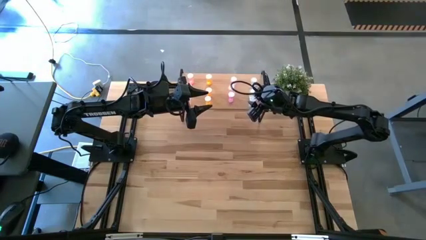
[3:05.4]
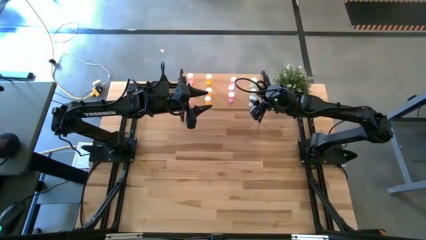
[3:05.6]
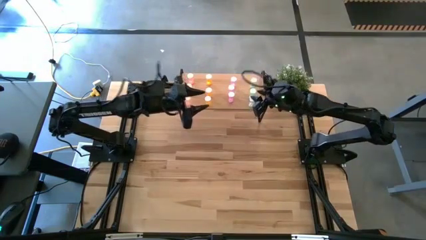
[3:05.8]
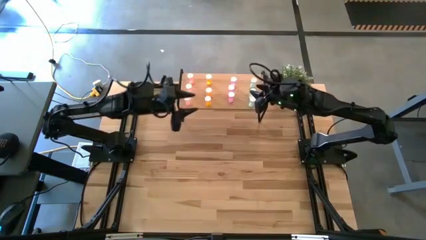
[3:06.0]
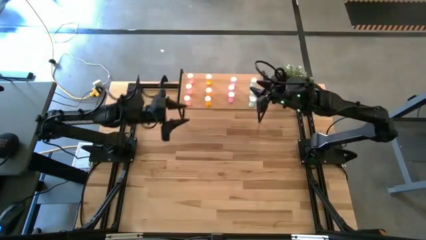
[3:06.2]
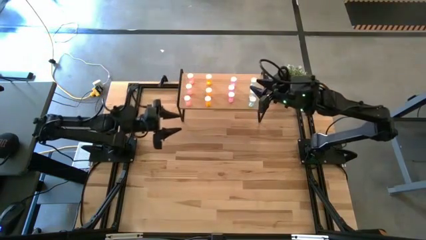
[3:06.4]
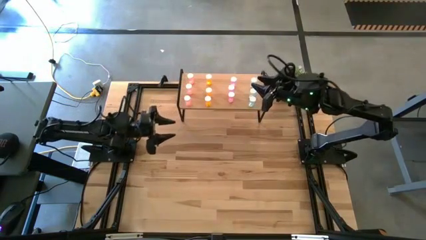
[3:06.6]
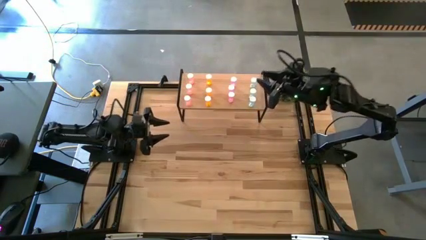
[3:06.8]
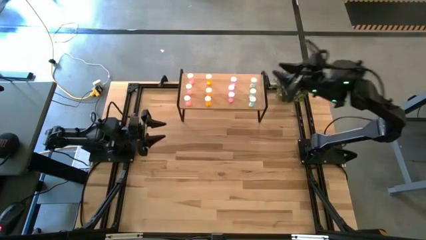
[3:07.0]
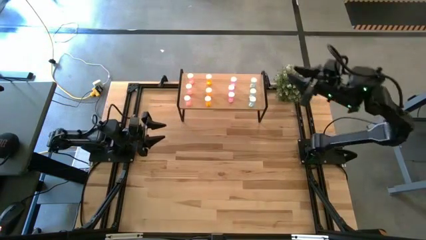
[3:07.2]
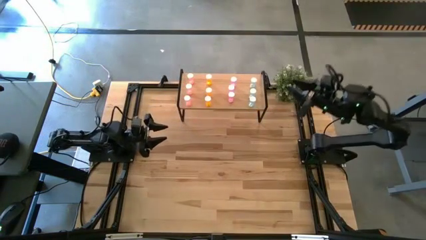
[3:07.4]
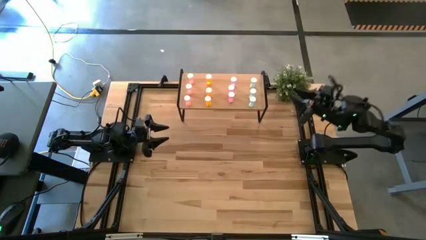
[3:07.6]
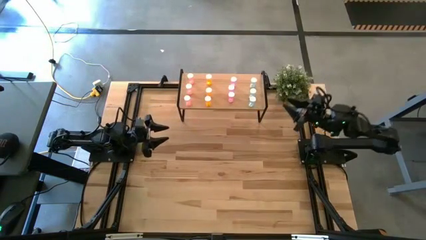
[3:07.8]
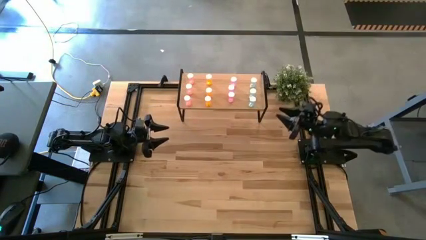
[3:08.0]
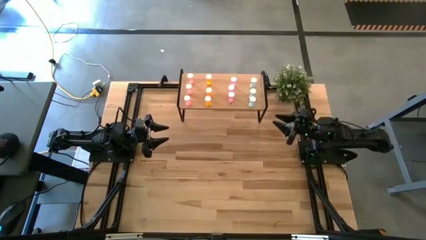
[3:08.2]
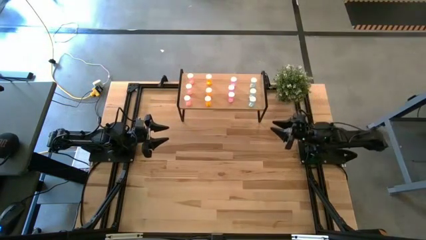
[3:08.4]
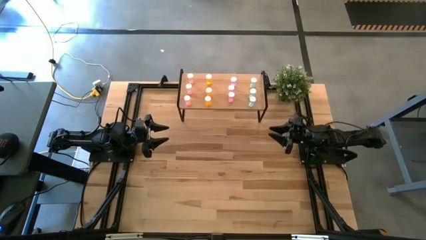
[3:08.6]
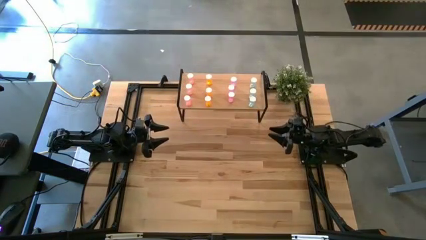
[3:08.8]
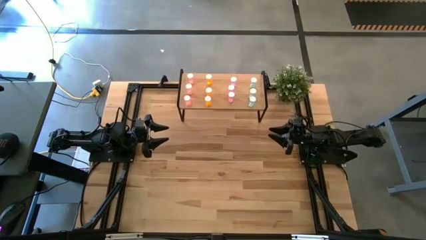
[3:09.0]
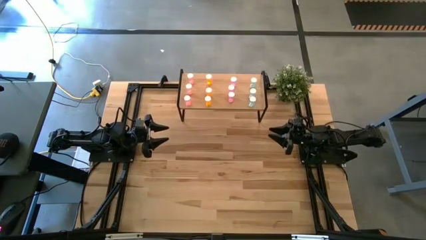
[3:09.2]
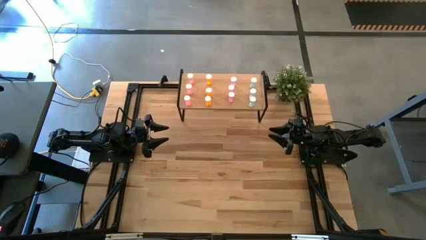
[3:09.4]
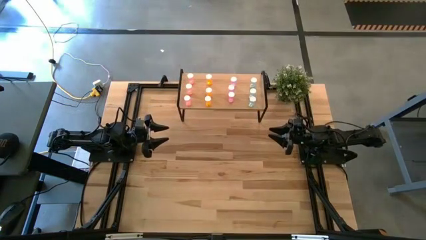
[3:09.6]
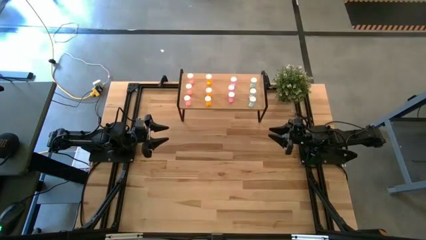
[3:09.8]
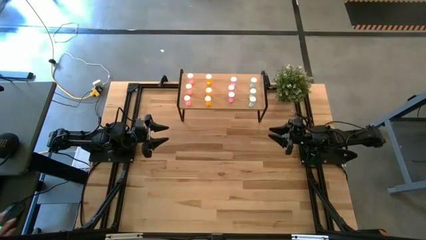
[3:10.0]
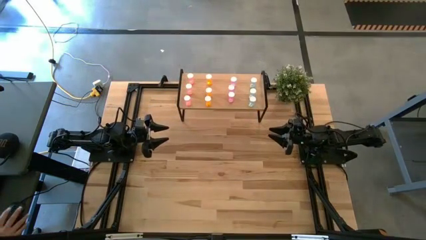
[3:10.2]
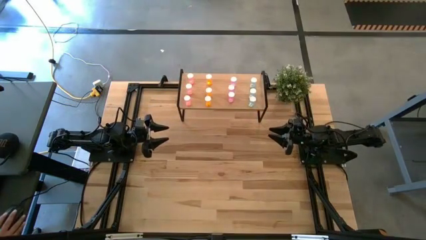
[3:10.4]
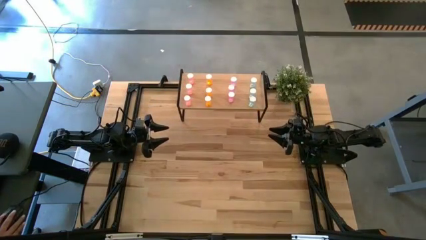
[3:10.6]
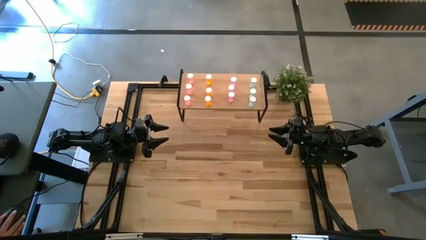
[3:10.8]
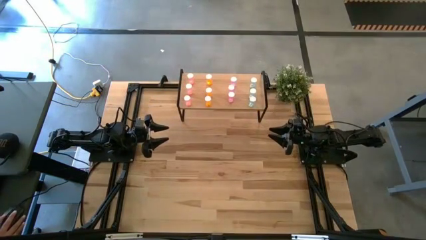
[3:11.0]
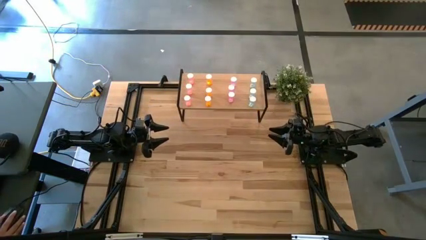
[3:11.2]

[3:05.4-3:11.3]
Task: Pick and place medicine bottles onto shelf by color
Return to Home Position

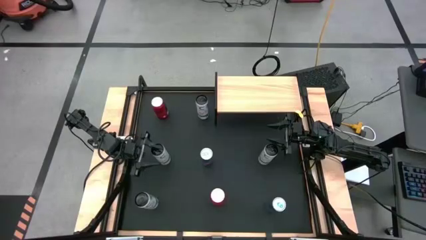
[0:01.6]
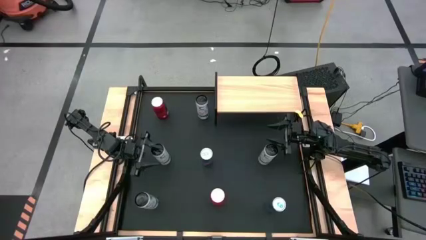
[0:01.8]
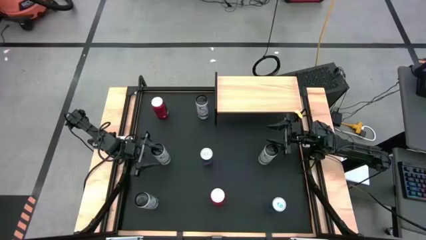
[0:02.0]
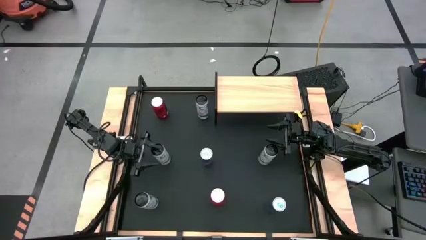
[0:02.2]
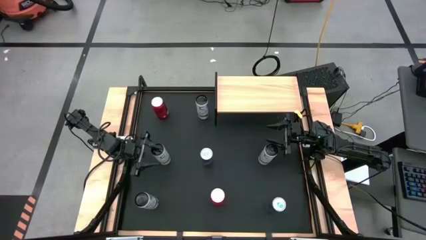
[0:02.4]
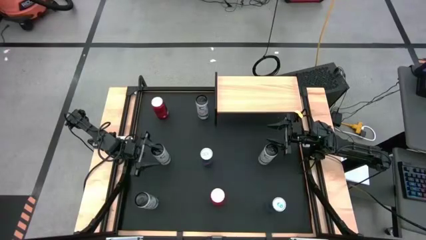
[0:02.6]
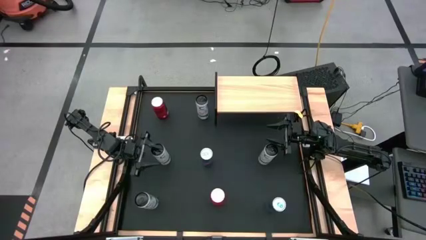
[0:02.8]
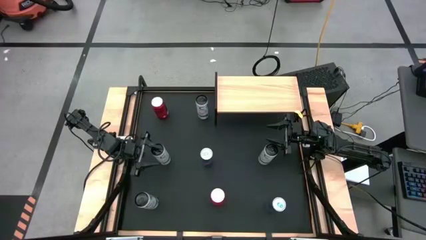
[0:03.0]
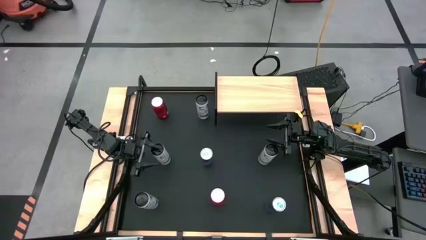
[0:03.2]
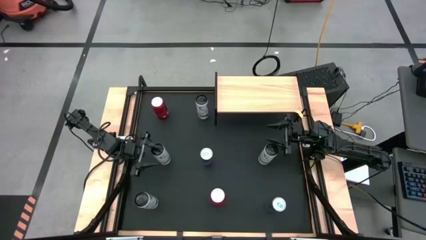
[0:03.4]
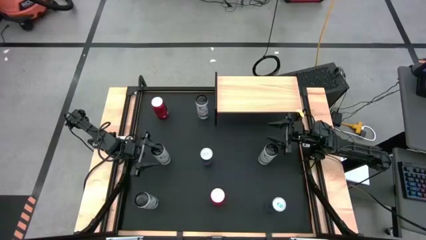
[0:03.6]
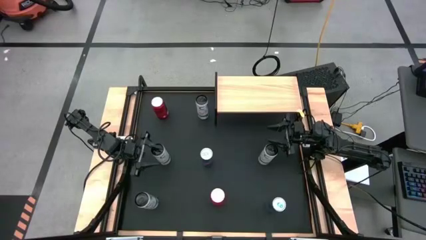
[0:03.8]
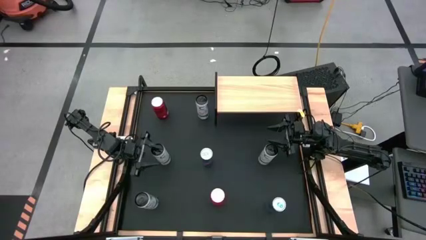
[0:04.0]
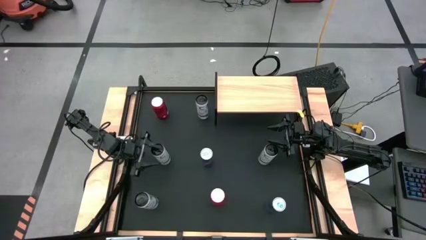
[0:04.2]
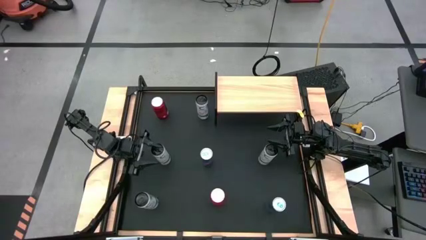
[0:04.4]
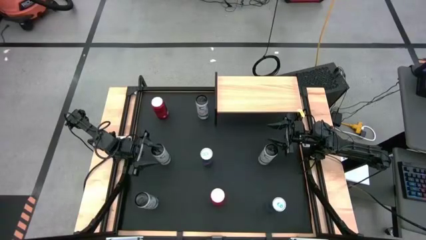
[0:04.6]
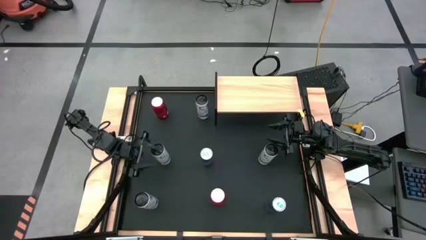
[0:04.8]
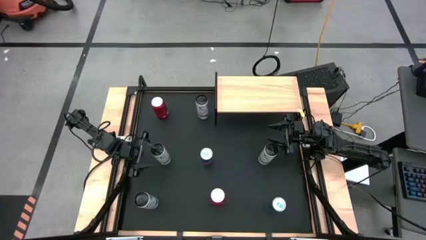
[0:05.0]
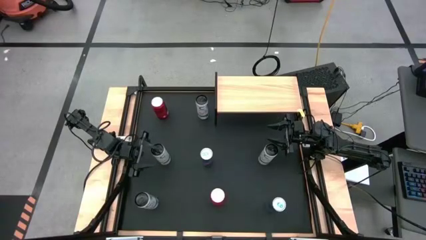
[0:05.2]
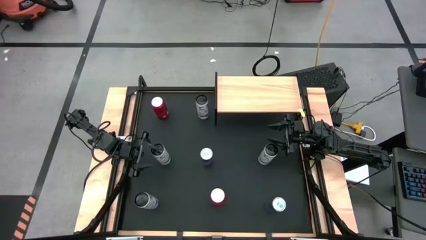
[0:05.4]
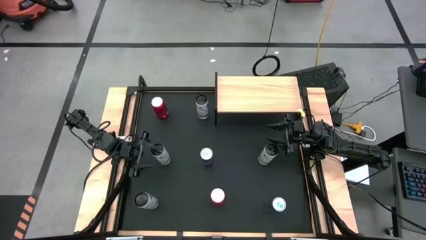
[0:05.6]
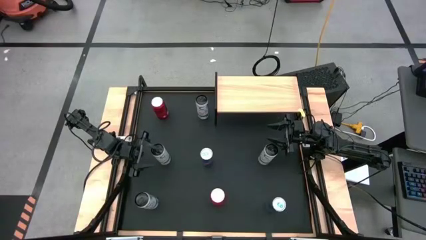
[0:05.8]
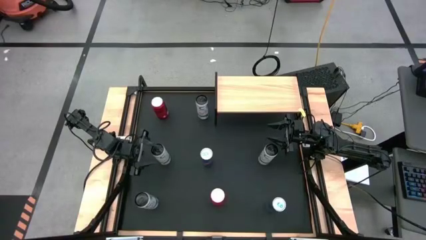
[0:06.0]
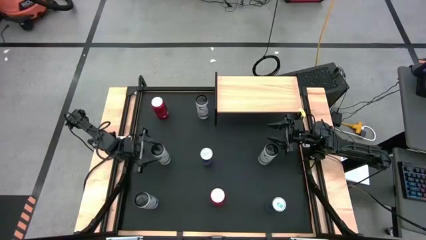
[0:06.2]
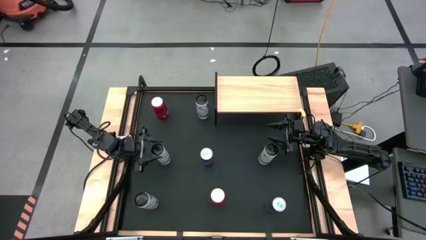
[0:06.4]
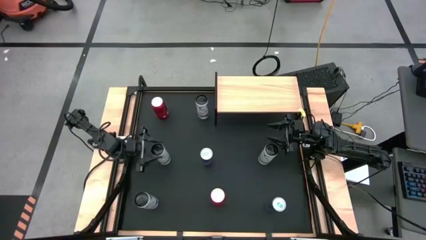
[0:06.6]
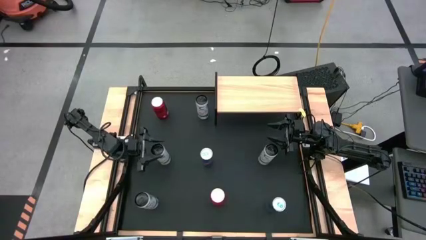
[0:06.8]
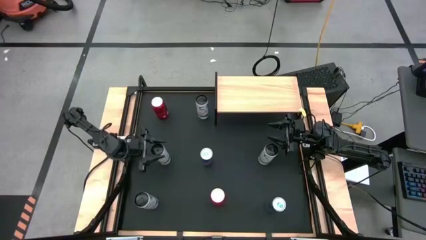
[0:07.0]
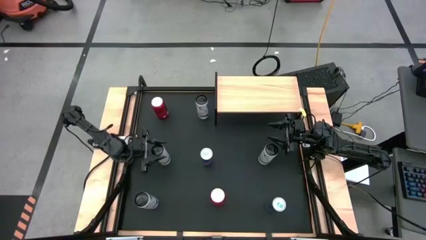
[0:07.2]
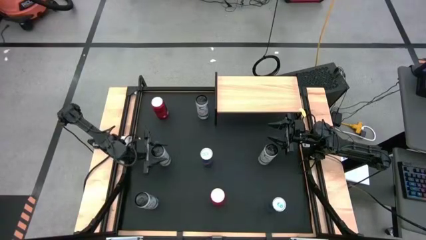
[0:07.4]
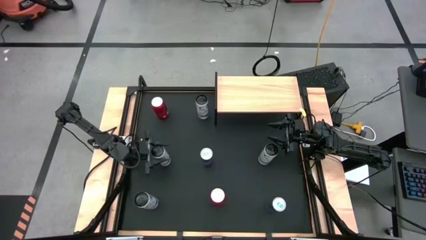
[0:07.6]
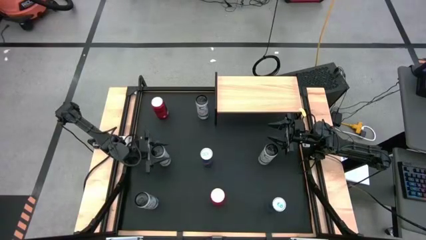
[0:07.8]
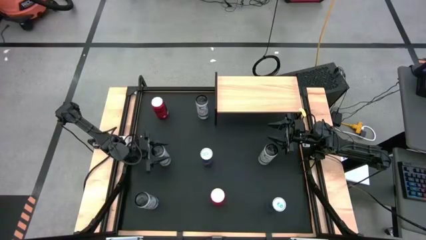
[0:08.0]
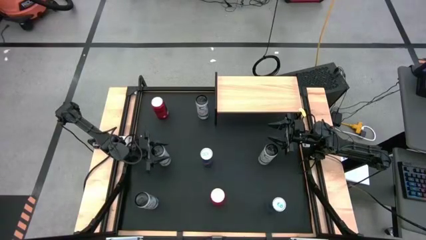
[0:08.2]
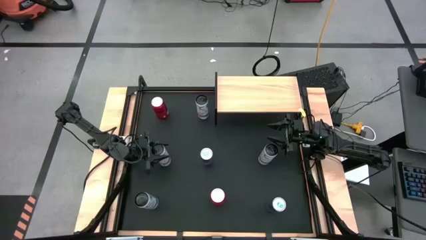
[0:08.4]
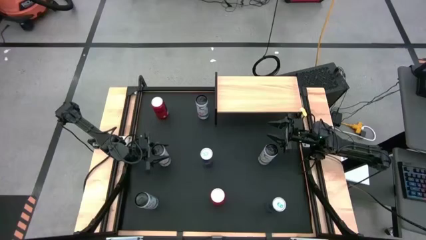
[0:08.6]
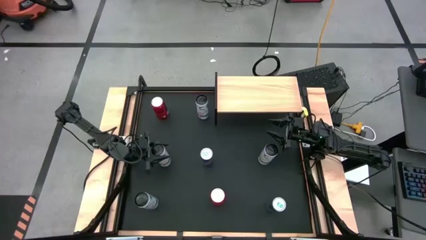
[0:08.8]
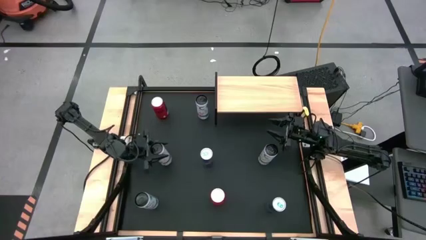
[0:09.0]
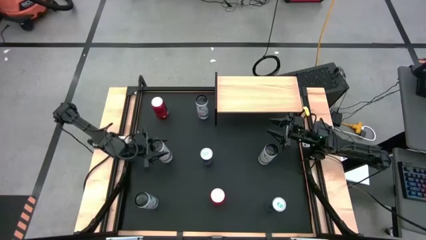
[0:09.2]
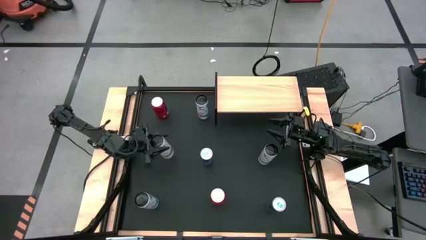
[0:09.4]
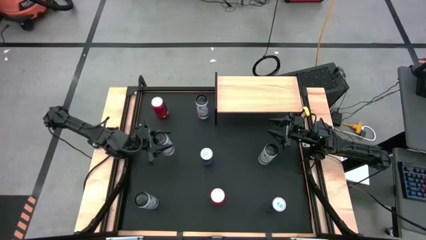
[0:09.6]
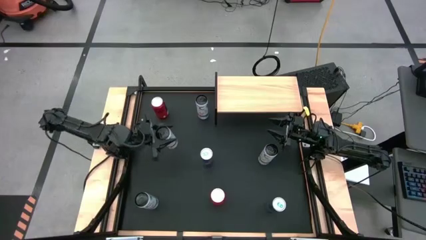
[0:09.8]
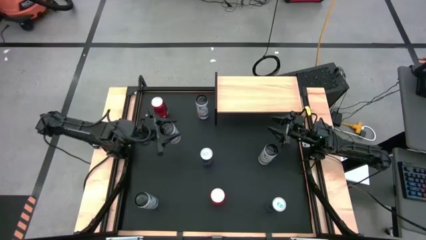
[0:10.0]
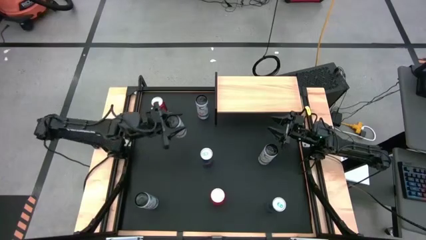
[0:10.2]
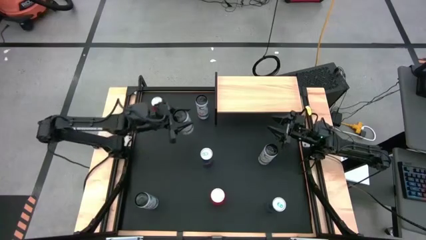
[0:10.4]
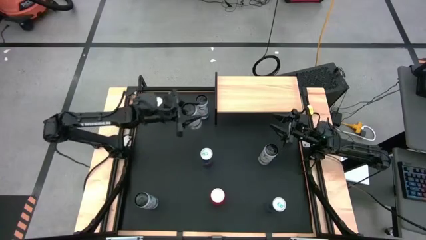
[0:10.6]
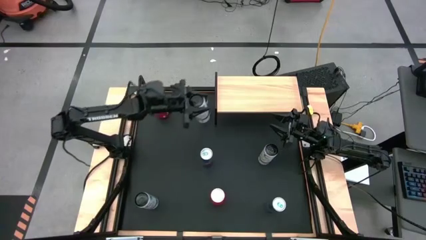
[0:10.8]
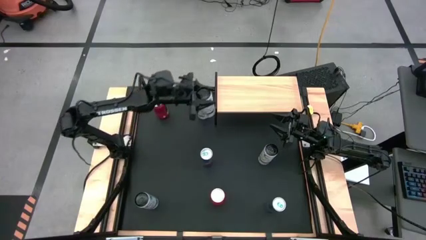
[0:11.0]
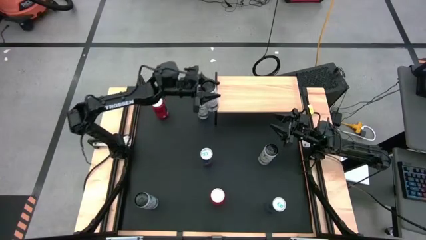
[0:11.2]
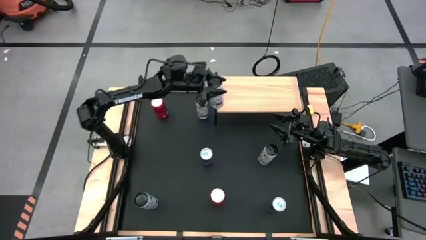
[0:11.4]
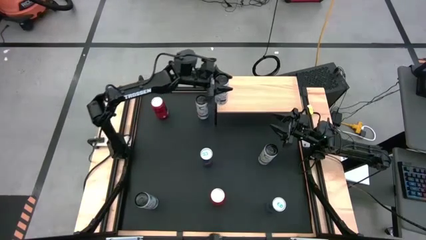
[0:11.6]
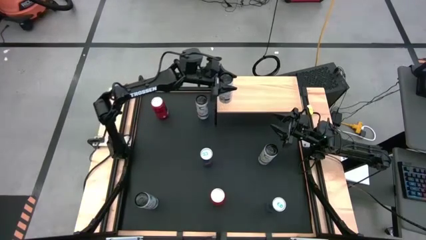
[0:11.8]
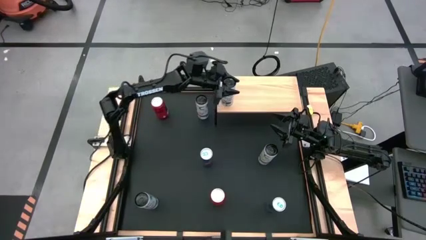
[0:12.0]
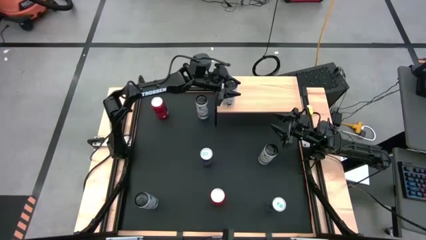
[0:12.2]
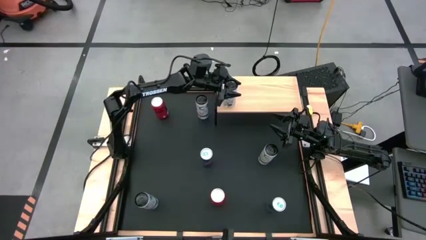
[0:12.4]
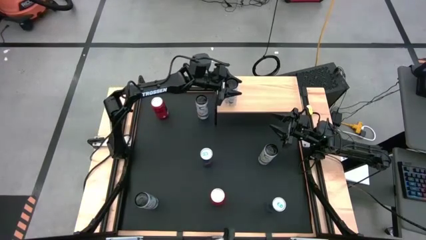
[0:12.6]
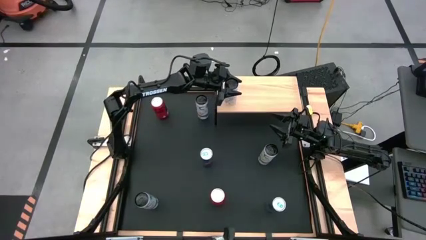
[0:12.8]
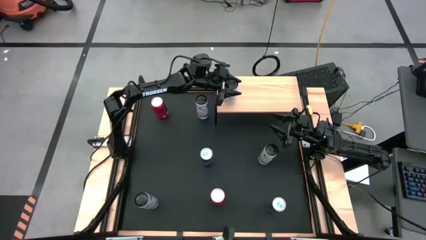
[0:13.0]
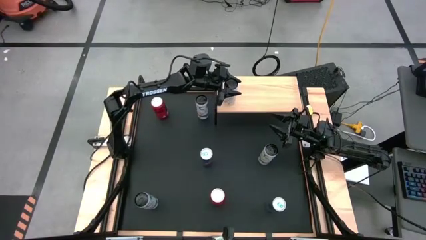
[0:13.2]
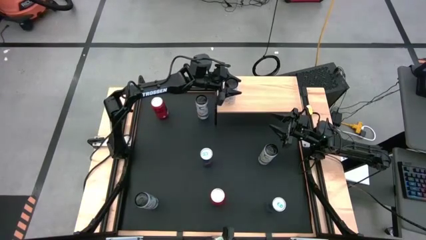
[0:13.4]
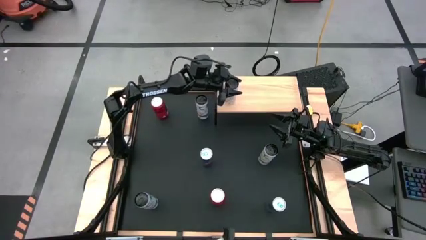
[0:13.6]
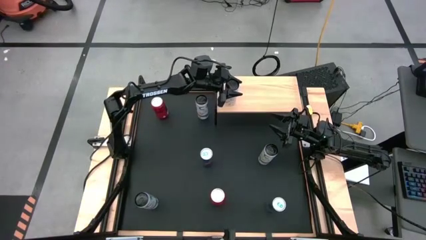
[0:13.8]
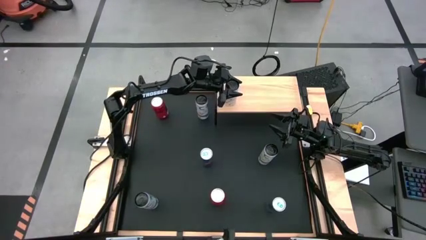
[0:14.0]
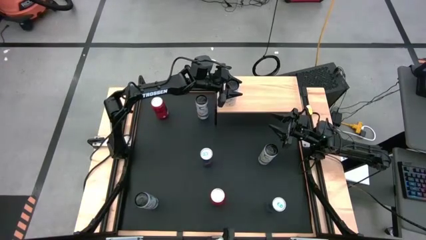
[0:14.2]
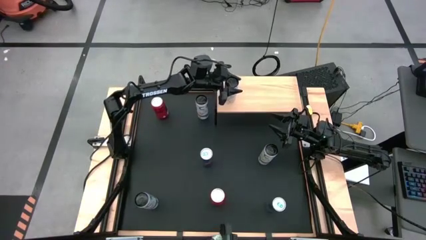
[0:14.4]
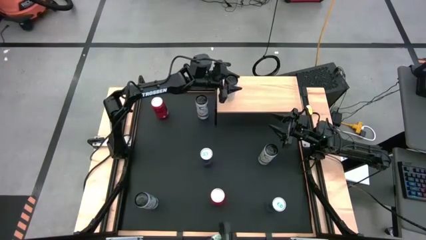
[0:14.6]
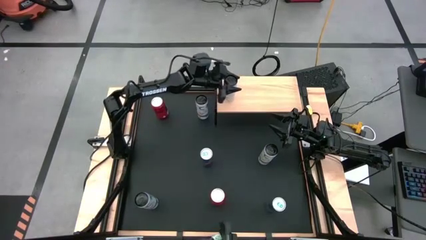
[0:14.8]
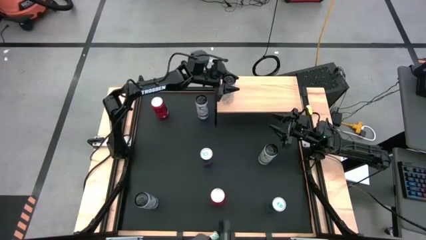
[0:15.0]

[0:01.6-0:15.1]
Task: Place canned beverage on shelf
Put the left white-yellow soda can on the shelf
